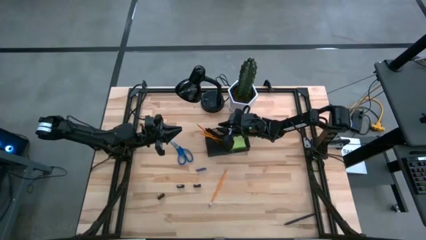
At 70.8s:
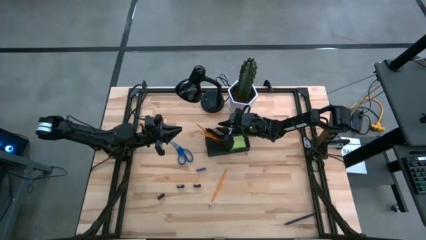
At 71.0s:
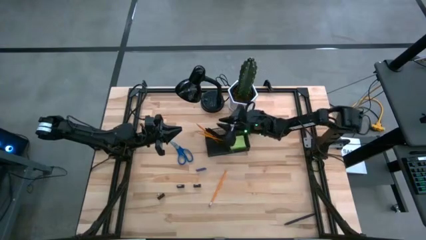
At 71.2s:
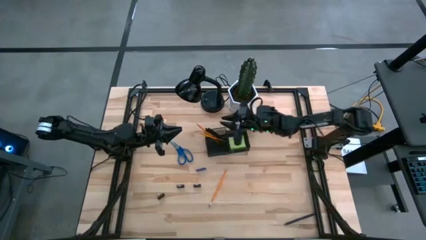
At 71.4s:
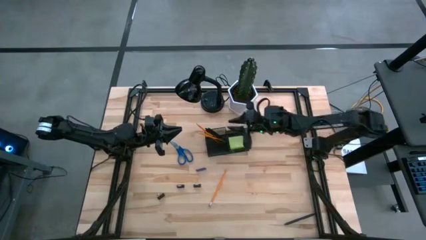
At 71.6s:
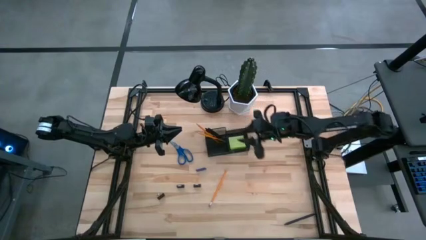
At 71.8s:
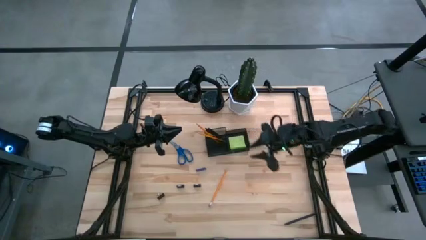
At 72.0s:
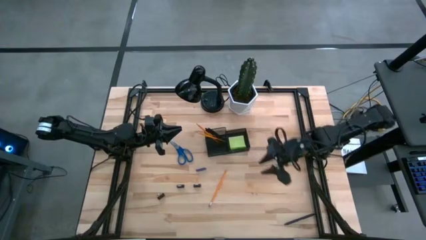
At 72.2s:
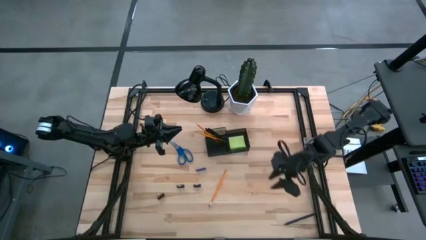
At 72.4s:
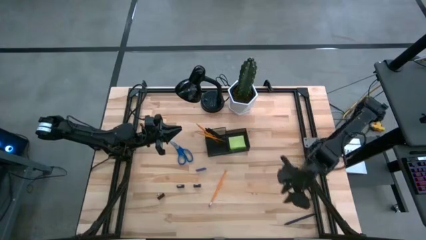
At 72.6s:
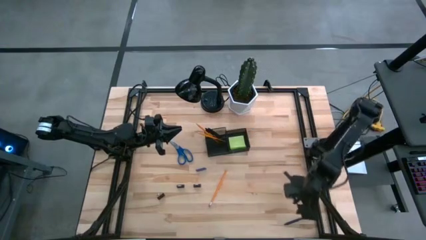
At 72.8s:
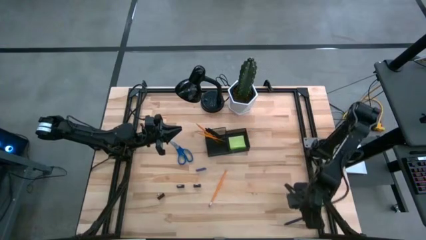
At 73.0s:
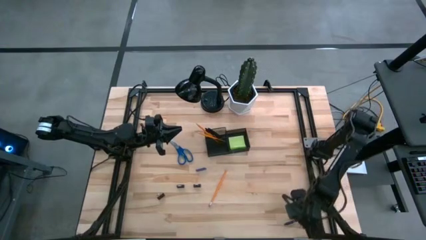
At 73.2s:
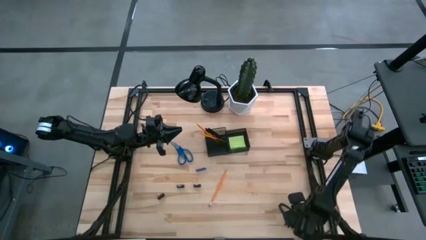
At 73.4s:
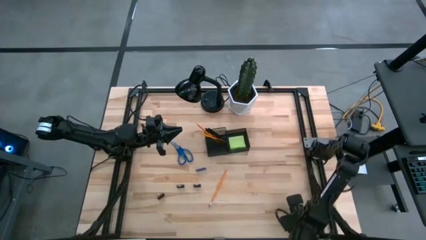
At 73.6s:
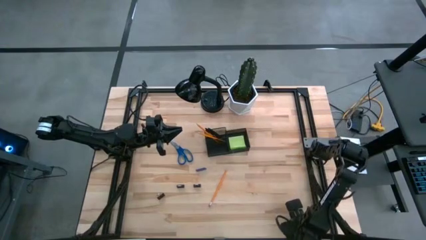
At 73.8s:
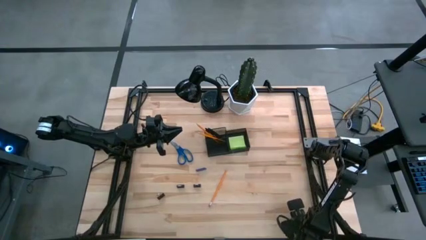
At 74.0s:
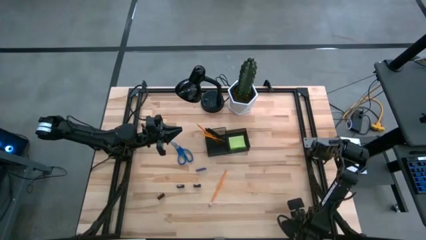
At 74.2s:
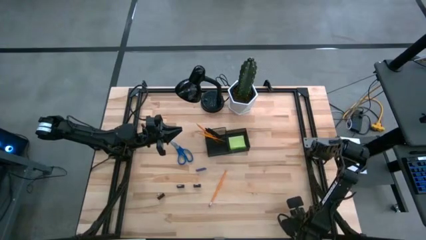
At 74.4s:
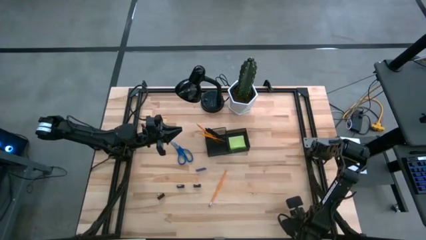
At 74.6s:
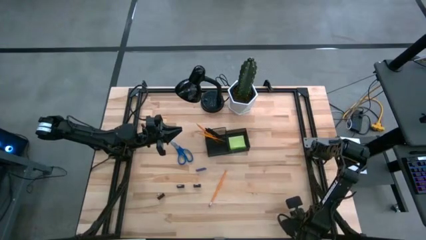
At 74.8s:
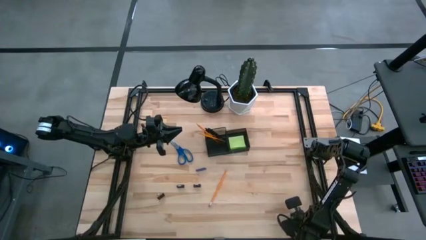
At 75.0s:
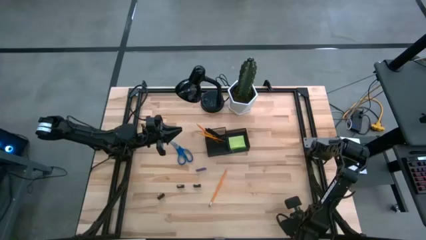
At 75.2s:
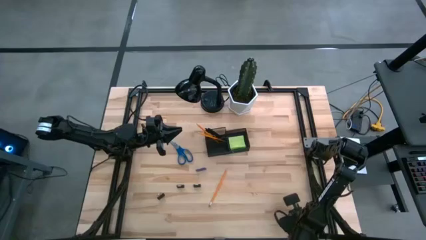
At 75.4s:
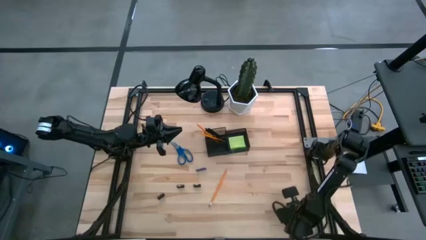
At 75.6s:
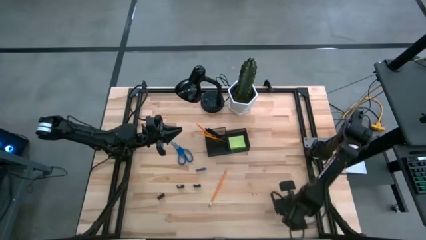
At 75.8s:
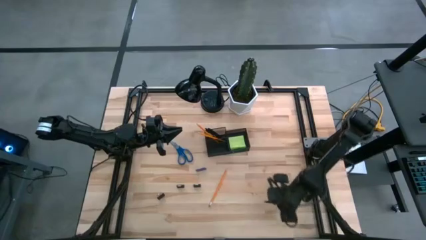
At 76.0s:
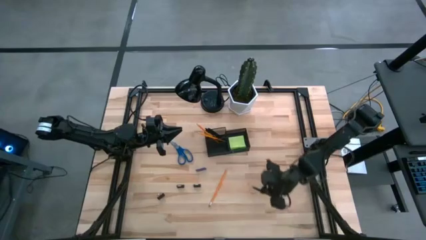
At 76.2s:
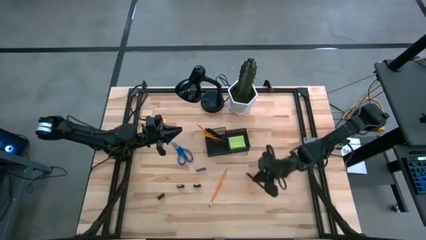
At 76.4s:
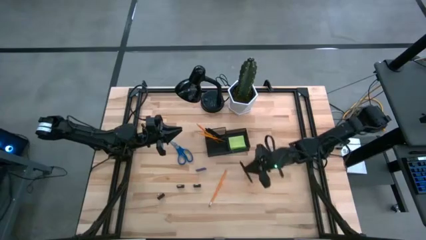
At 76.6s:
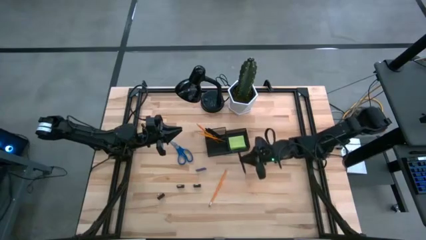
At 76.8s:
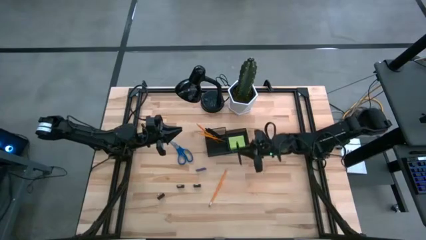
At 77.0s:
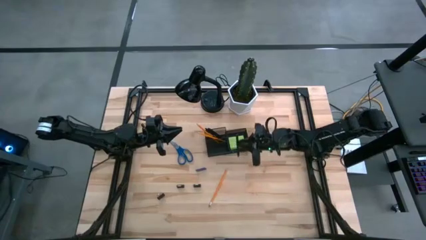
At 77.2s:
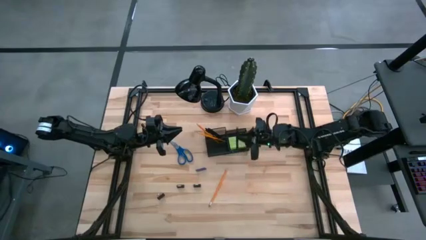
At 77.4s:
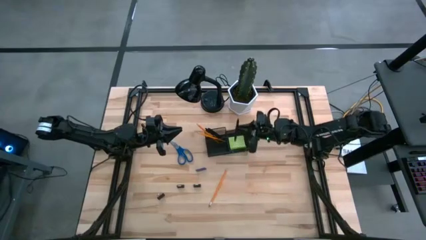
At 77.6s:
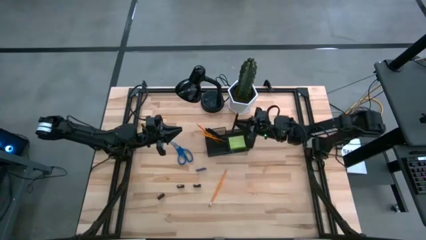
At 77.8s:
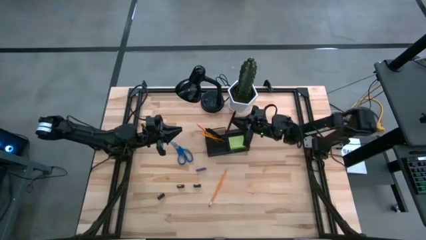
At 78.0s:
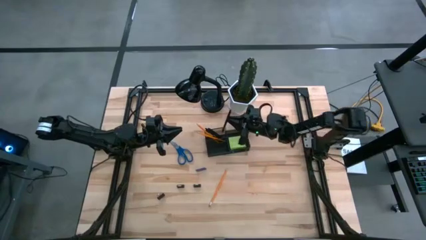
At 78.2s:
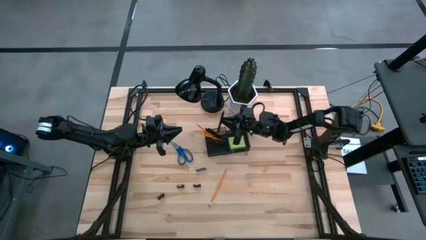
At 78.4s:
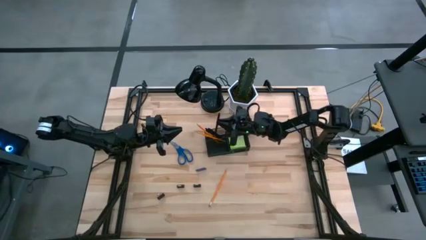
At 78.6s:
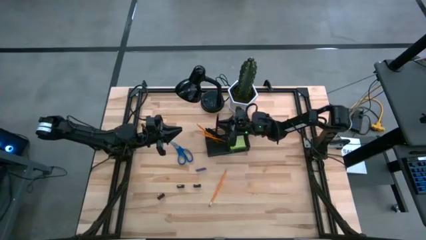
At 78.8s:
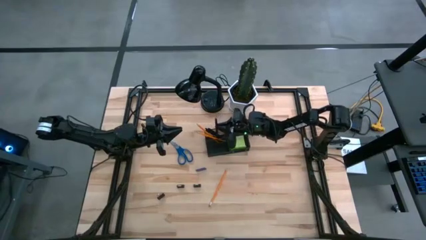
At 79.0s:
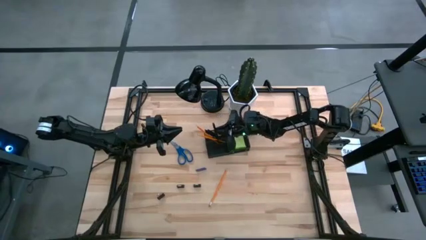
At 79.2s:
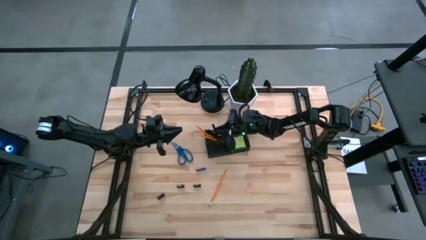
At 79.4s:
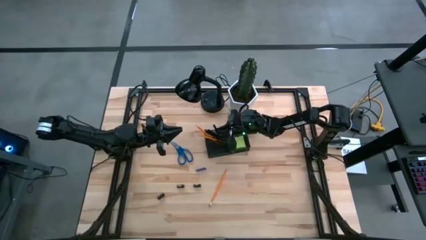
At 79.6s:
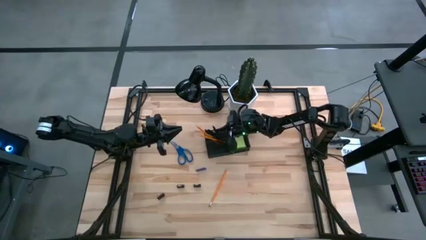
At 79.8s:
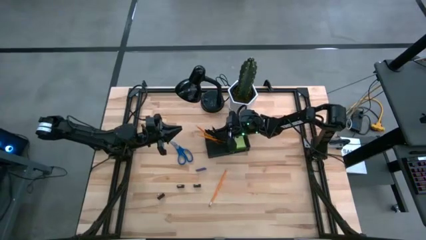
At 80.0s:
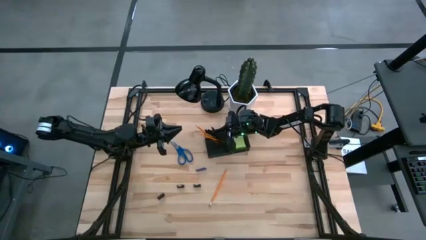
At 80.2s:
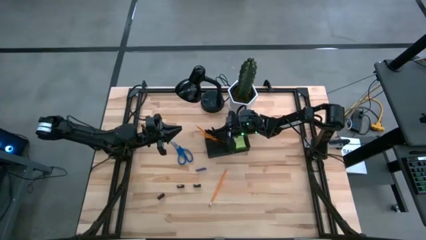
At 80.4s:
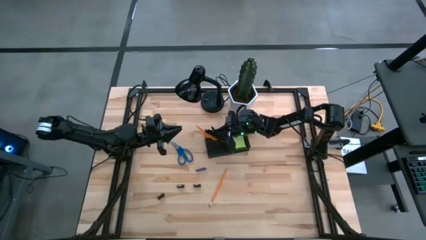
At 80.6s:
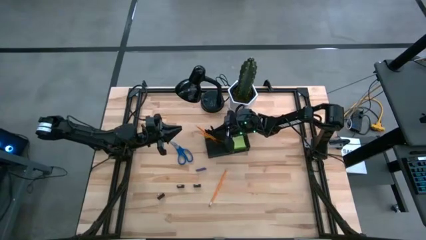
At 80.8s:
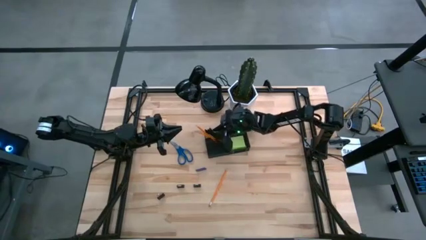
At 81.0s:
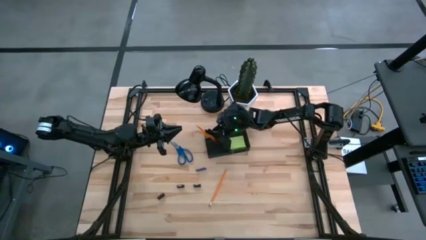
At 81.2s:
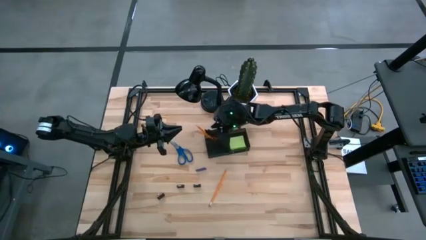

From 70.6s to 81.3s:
Task: Pick and place office supplies into organizer
Put the black pen into the desk organizer
